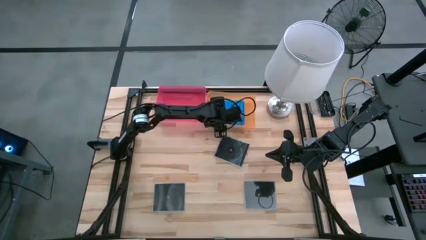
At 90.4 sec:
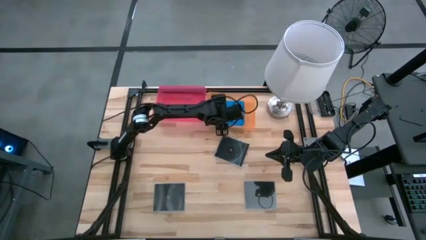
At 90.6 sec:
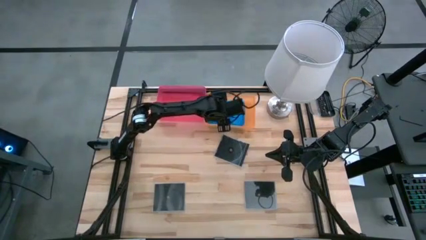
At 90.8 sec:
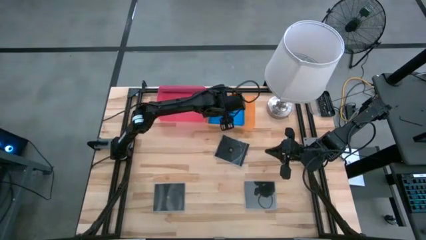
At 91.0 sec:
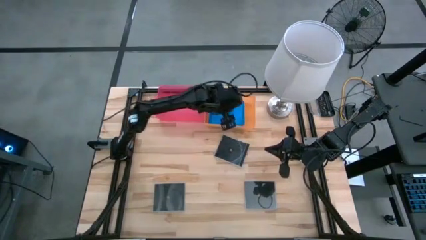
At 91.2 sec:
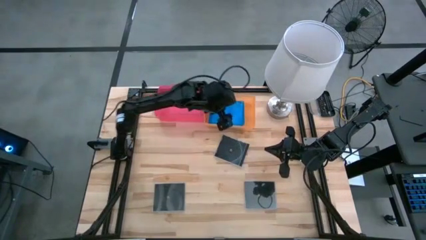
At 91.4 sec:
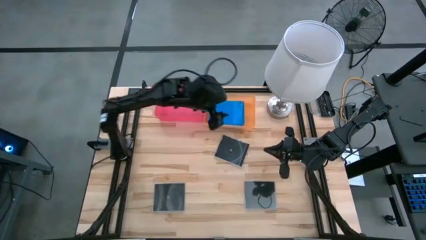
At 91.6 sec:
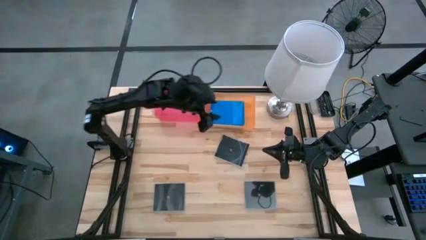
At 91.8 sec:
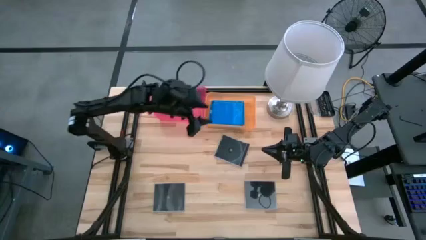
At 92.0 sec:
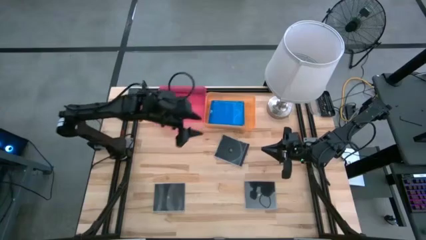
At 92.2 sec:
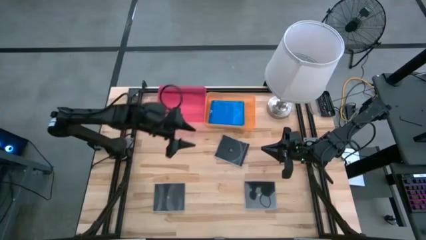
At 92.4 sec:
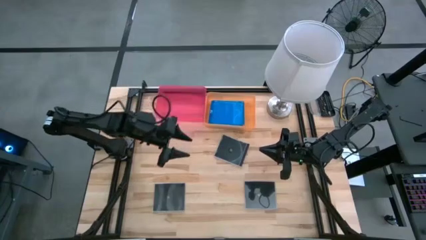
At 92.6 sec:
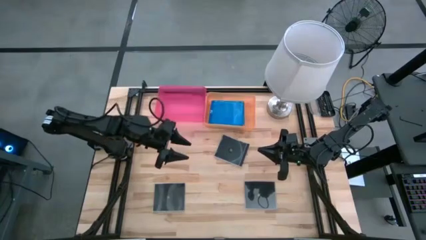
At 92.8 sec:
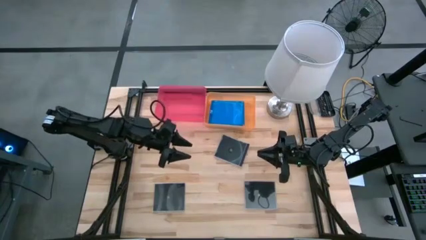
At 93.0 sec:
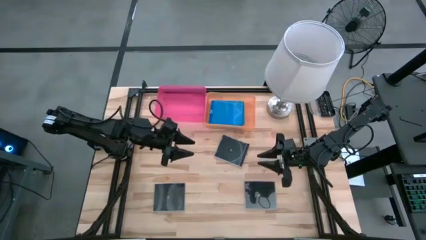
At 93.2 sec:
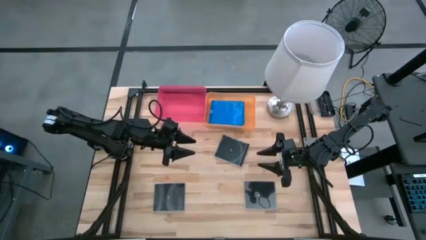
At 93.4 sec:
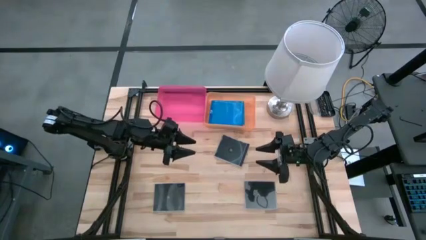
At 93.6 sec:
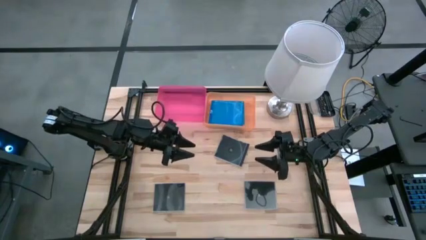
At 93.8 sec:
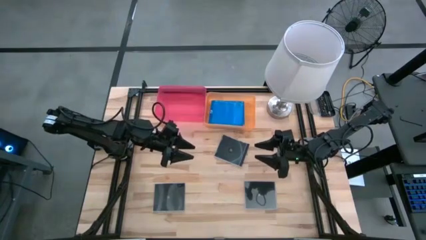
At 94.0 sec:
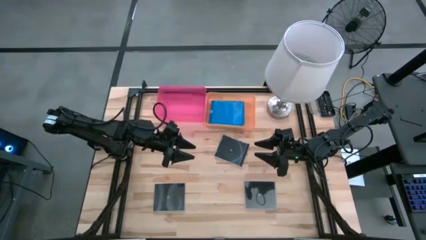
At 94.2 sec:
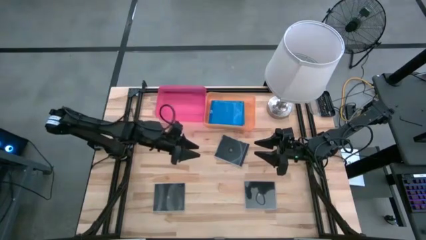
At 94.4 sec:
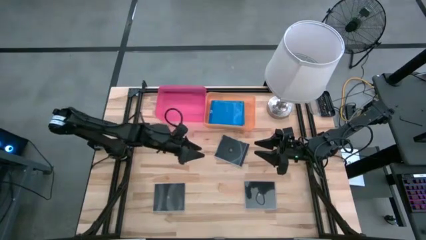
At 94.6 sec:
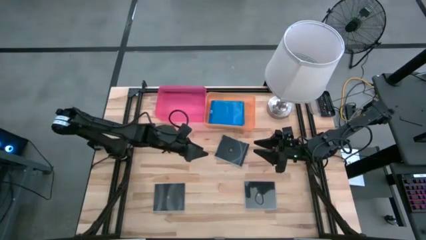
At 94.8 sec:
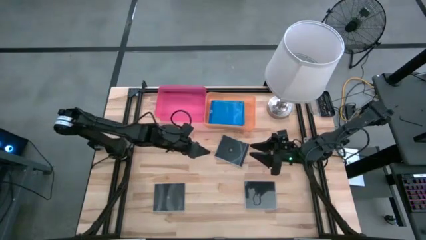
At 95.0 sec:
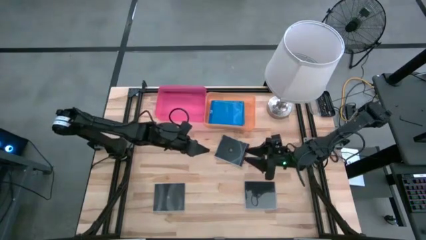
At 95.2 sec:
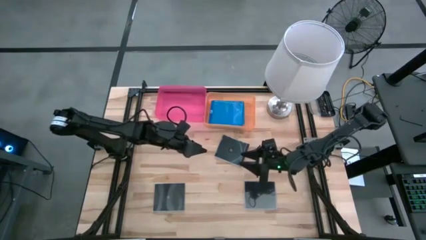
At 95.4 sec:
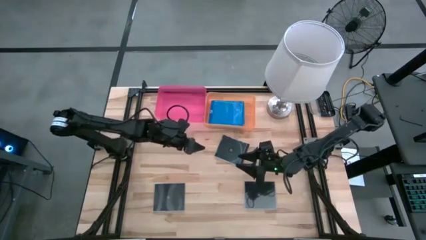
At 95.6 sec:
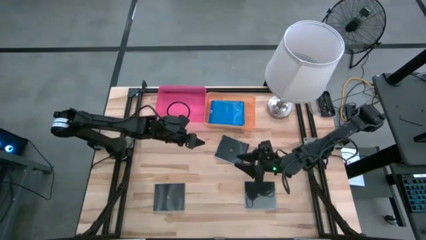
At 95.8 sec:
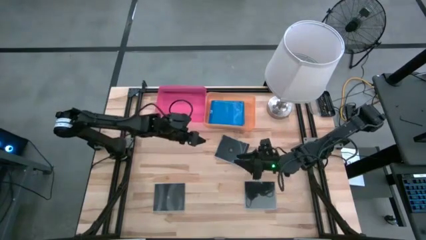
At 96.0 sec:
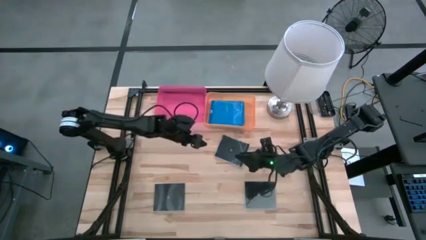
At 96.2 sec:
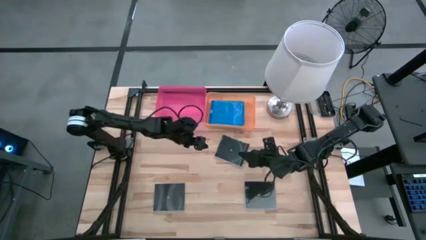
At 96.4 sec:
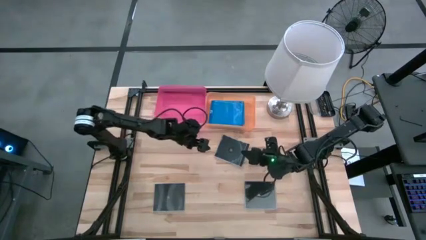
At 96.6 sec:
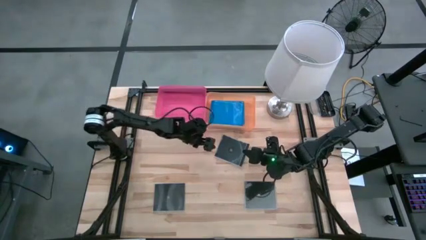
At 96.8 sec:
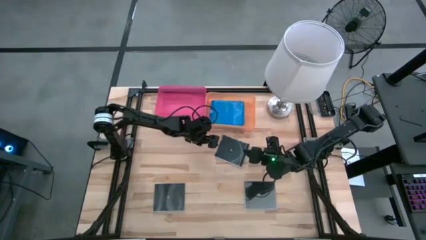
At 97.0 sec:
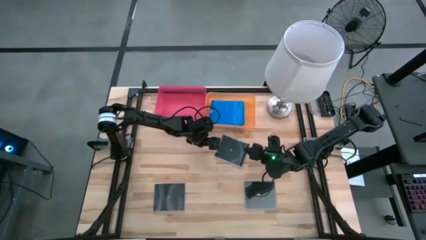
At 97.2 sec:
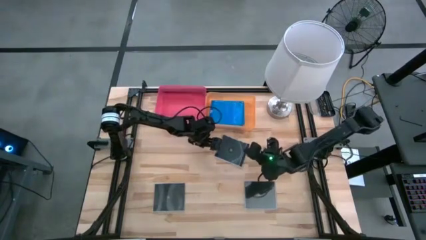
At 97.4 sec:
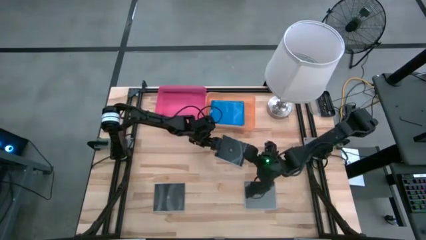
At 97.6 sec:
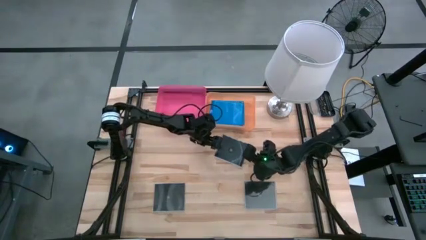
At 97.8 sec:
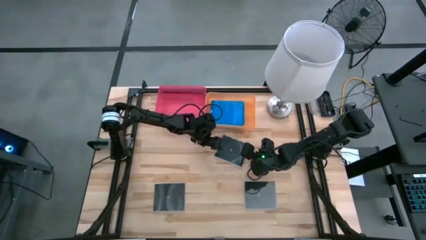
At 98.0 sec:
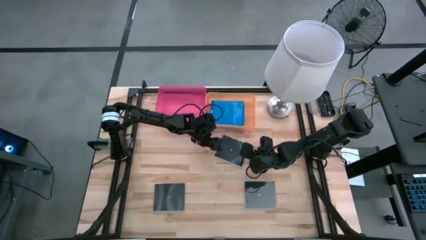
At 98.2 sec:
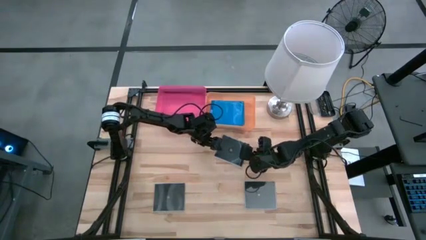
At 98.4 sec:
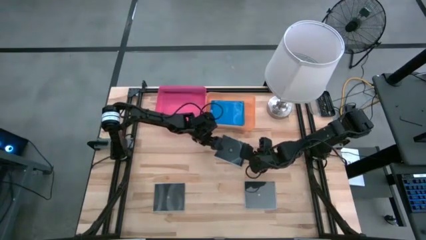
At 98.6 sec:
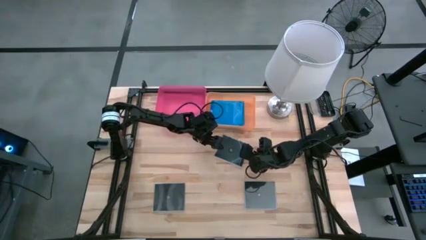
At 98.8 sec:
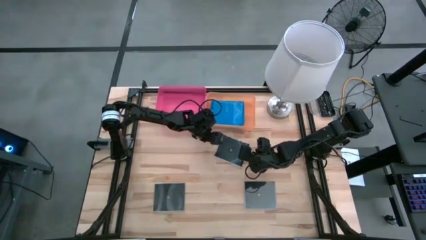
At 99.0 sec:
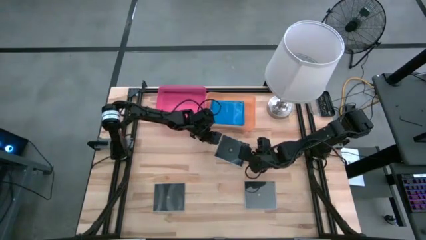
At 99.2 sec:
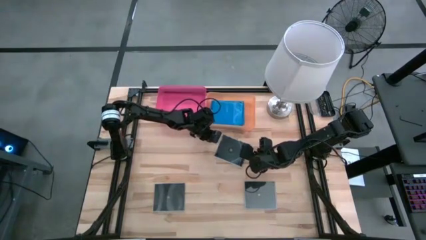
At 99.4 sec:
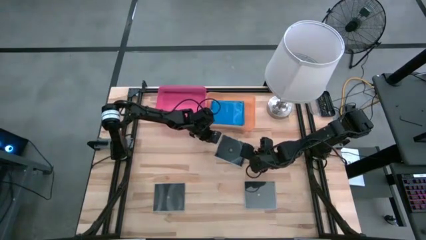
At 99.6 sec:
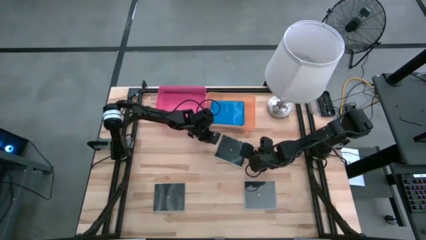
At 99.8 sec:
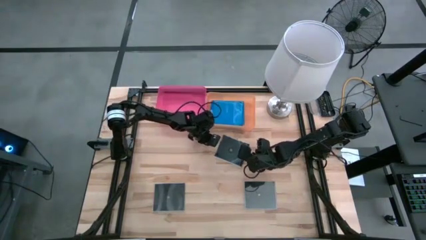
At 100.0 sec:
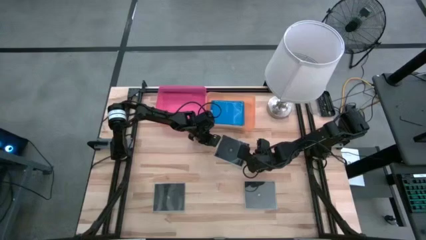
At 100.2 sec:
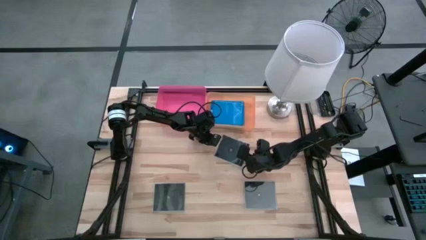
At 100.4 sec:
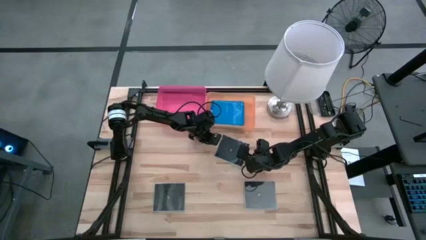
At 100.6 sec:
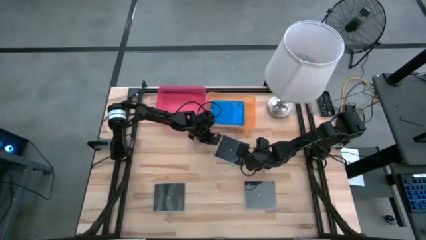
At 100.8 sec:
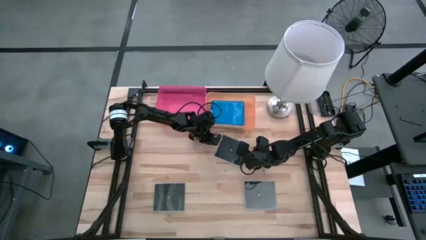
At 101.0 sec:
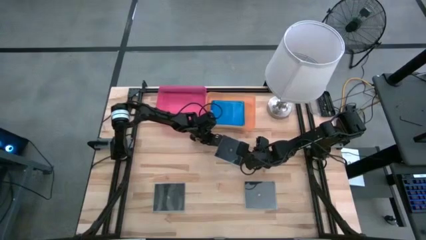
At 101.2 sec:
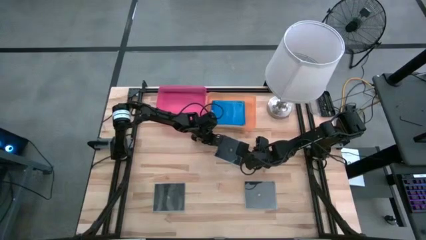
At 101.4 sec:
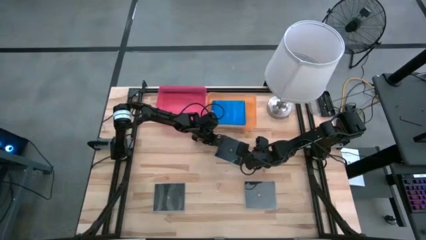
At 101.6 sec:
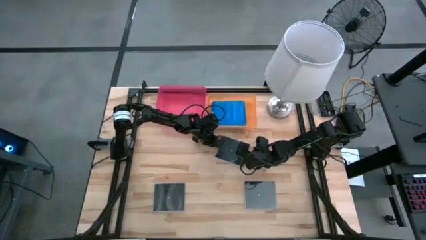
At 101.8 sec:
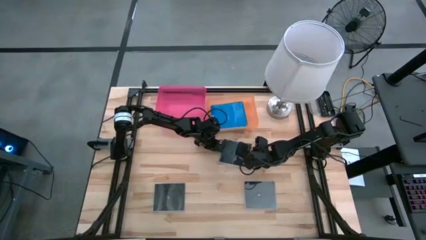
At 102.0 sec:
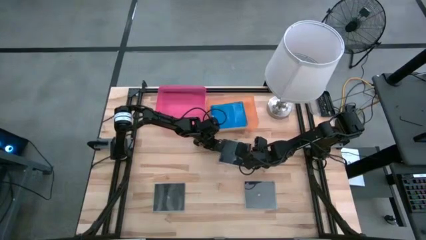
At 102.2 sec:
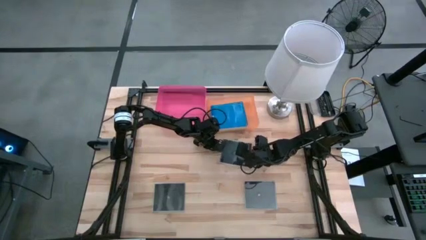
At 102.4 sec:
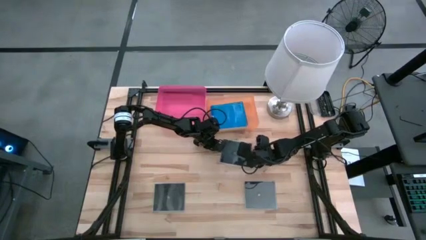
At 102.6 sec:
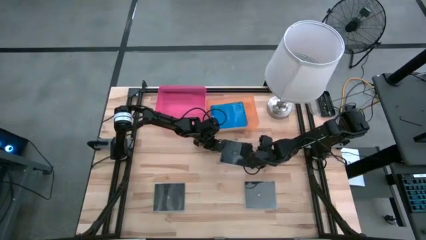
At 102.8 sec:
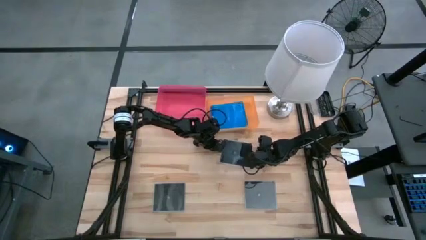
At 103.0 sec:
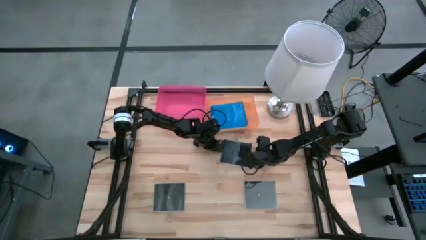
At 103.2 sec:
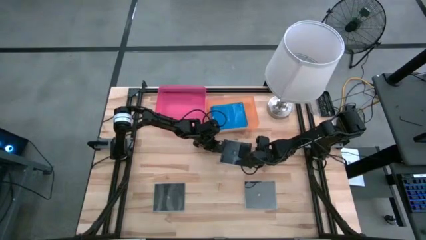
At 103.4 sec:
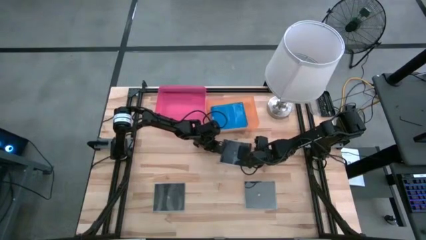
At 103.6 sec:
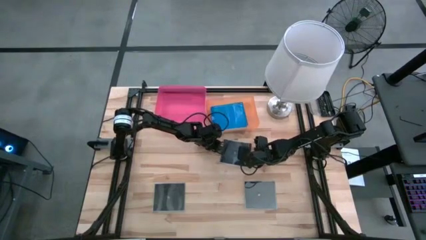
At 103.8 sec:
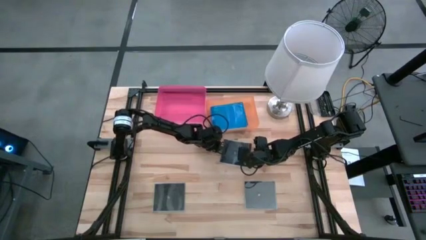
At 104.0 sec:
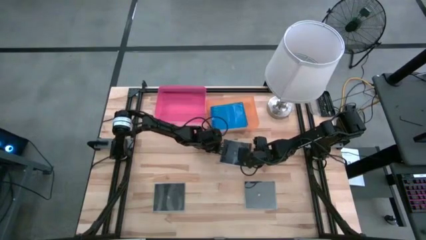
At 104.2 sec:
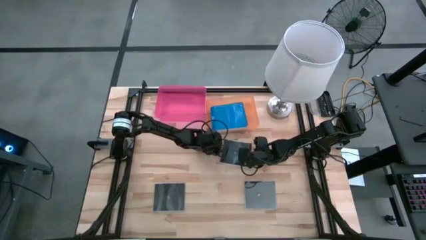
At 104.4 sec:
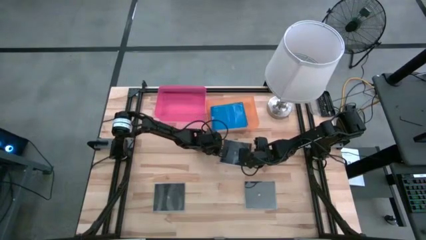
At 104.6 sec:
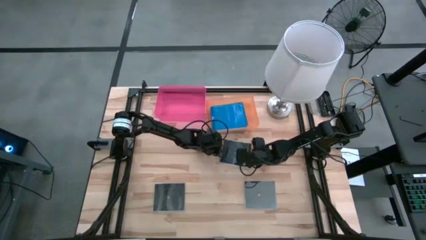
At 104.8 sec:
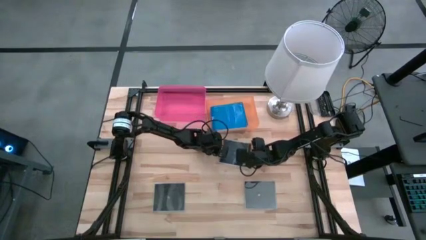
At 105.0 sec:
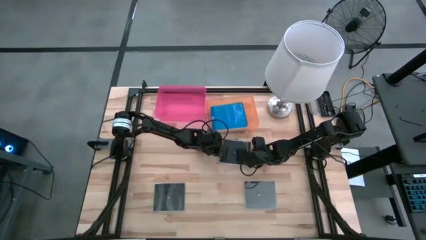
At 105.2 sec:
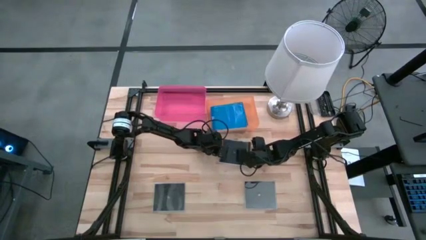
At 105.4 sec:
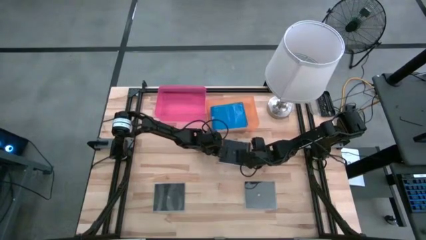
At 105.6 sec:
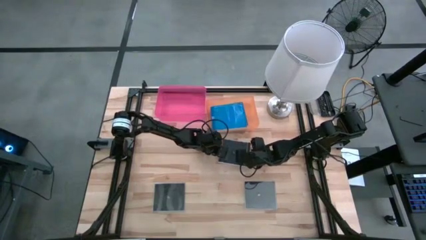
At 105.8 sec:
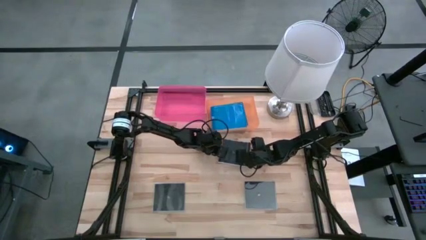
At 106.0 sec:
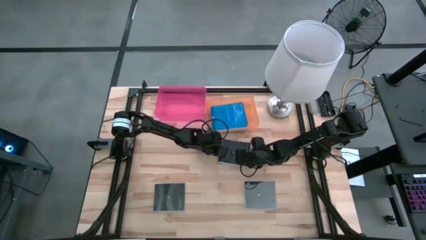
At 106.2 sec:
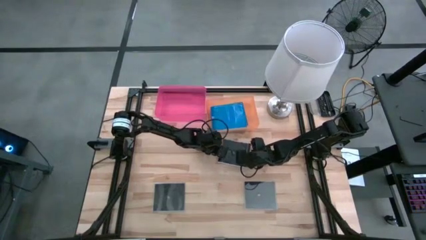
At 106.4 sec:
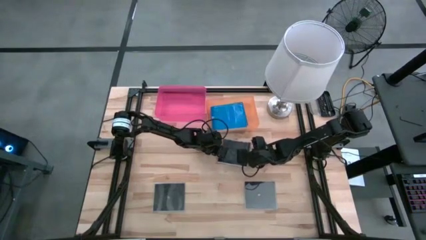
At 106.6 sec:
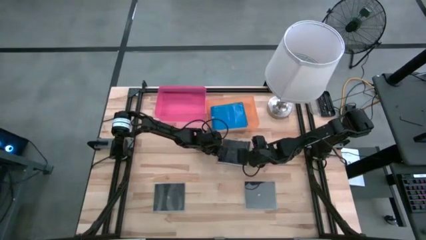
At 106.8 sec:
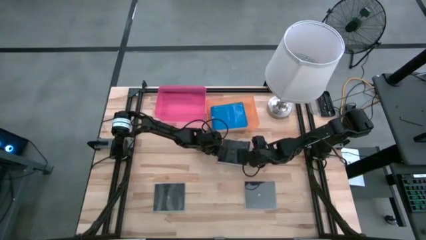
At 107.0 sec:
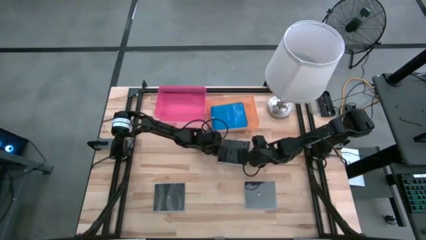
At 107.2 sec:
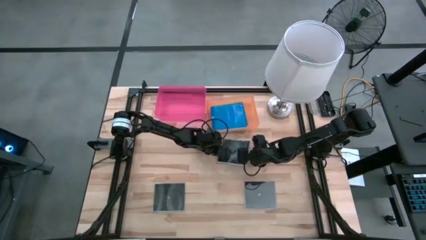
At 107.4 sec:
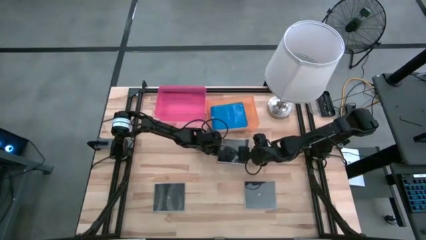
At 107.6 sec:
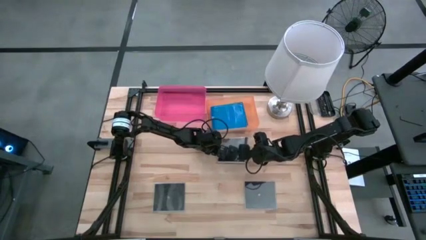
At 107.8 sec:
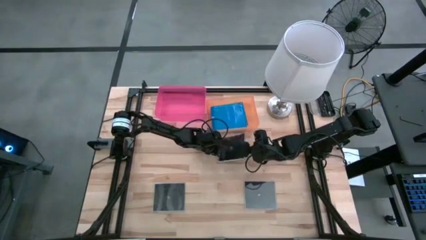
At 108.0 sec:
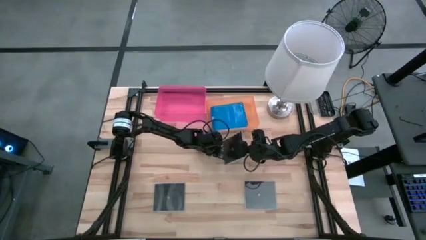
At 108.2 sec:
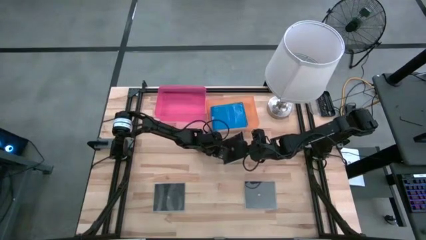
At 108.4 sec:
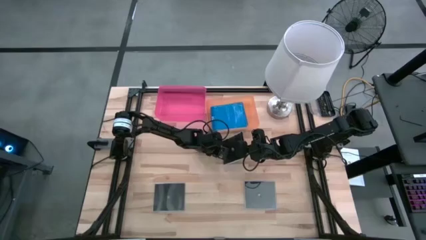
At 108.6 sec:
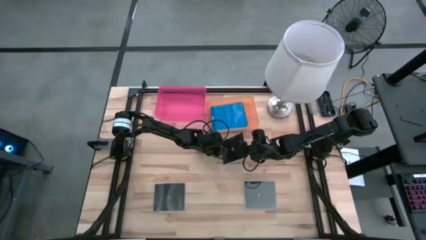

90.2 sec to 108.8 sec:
Task: Pick & place jewel cases by type
Put the top black CD case into the pink bin
